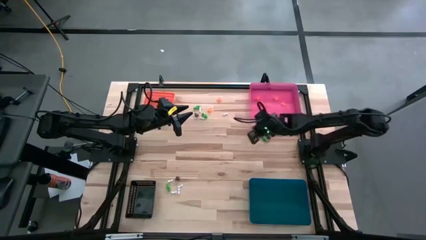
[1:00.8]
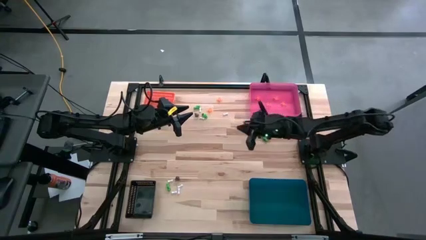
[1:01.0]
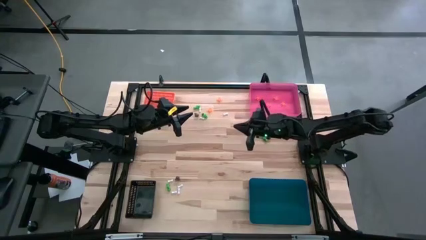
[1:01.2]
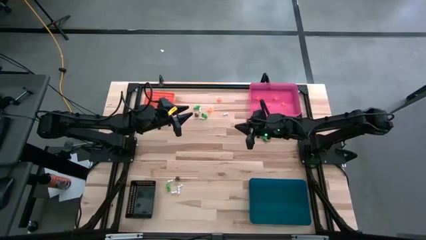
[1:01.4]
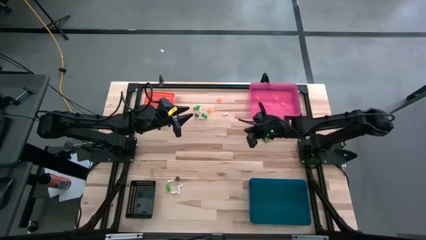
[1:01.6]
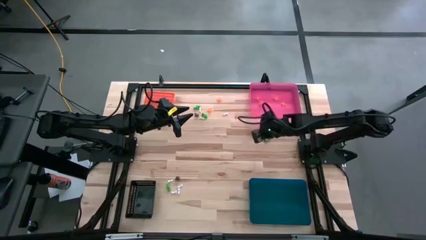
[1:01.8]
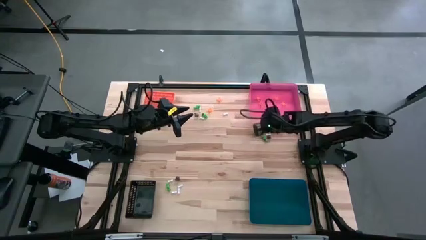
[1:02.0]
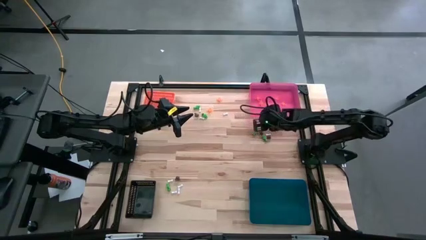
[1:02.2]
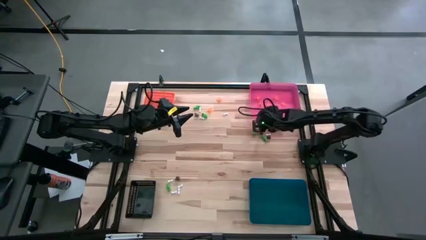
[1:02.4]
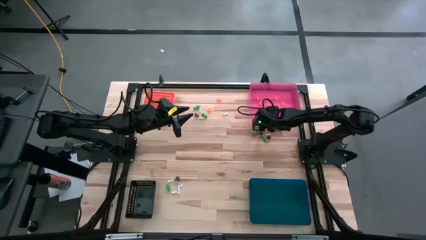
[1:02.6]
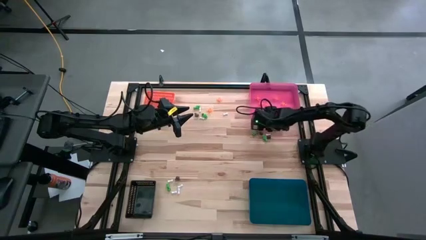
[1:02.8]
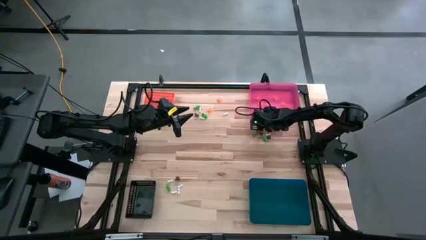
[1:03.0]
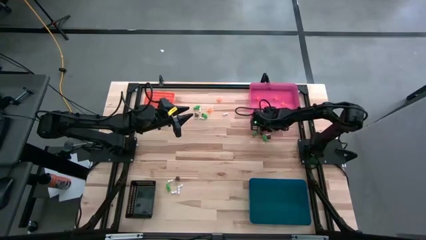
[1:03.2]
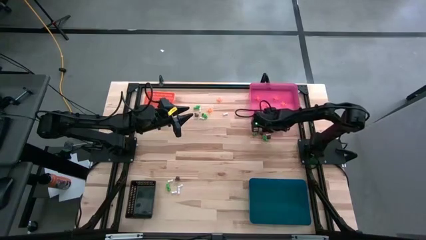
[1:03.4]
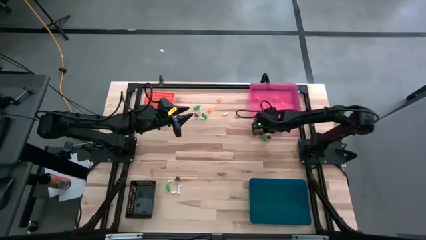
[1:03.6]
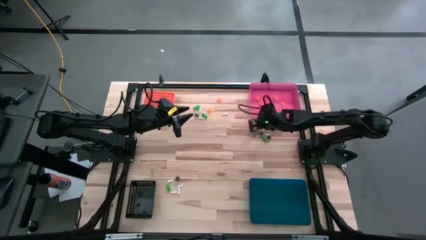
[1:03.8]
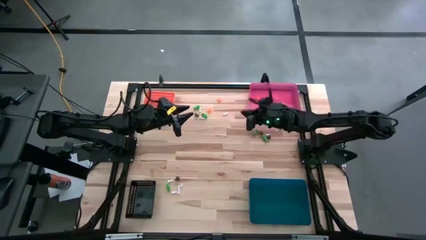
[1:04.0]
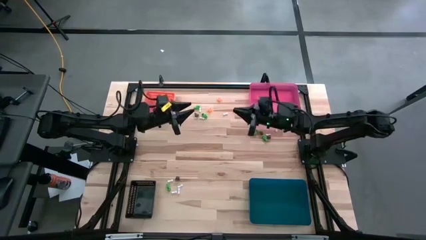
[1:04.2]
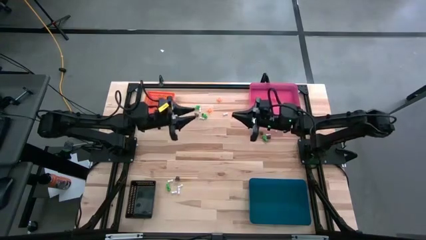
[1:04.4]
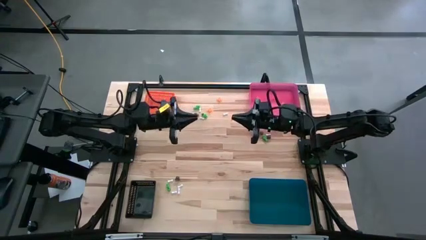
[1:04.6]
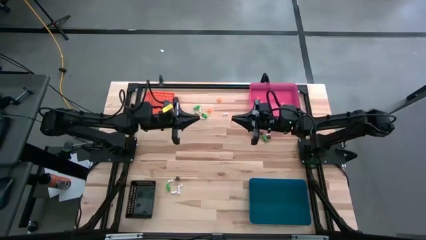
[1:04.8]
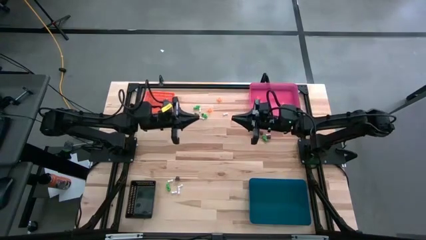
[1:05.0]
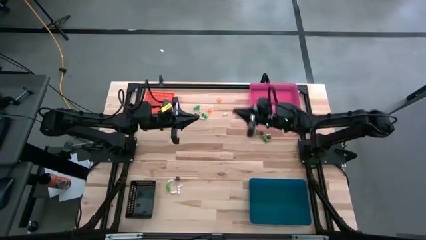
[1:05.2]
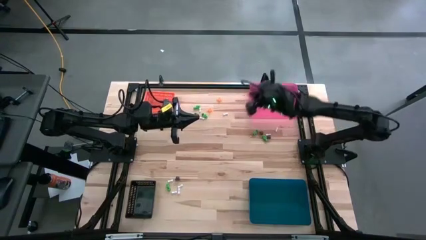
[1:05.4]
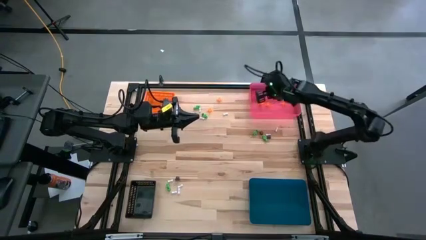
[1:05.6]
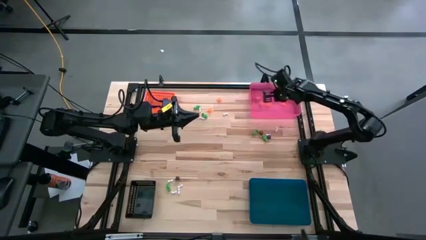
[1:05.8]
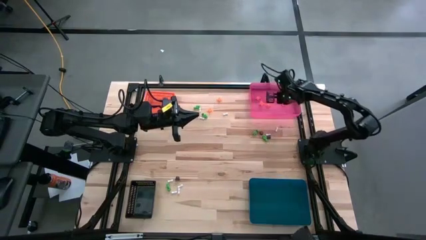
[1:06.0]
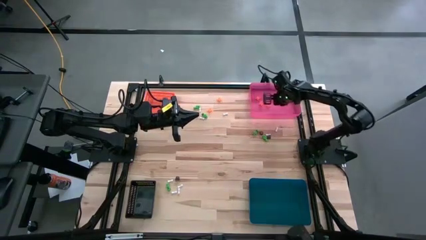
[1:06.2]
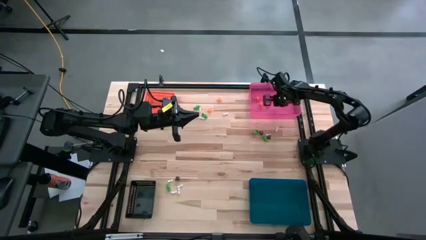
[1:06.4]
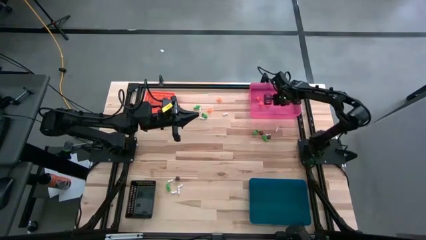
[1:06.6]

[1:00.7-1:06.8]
Task: Sort Halloween decoration
Put the bottom right orange spider toy into the pink bin

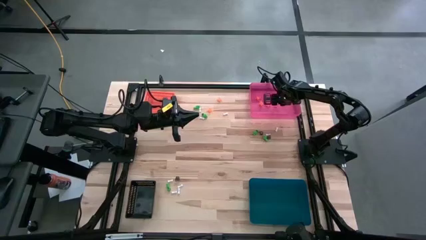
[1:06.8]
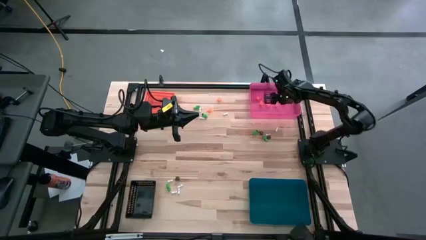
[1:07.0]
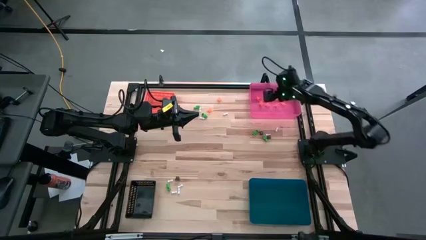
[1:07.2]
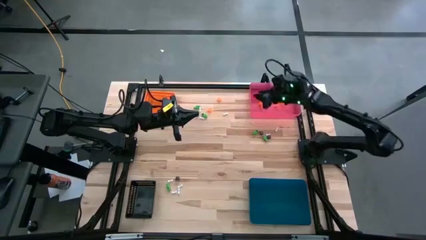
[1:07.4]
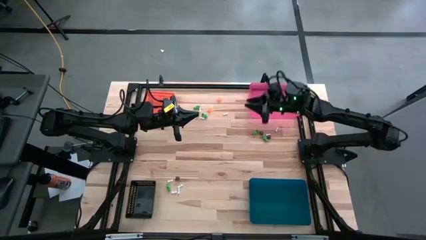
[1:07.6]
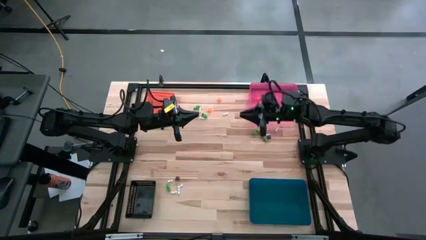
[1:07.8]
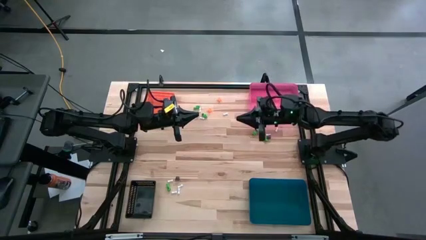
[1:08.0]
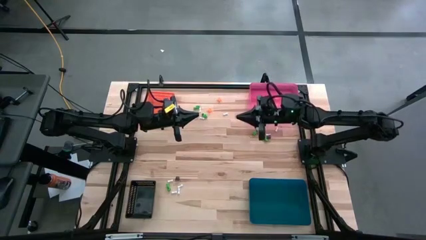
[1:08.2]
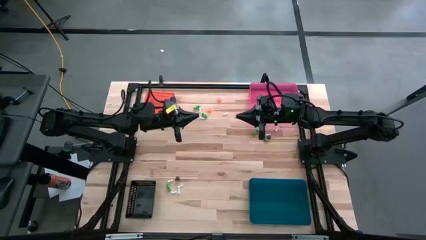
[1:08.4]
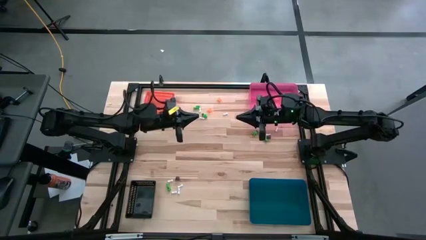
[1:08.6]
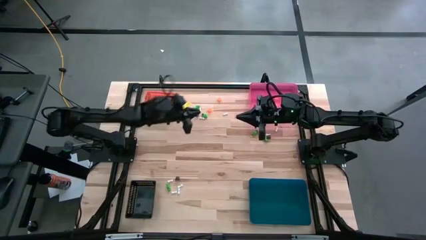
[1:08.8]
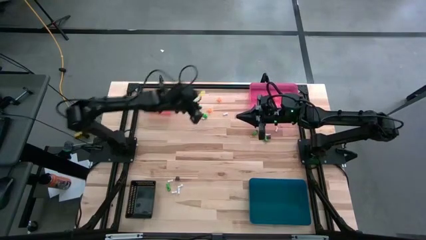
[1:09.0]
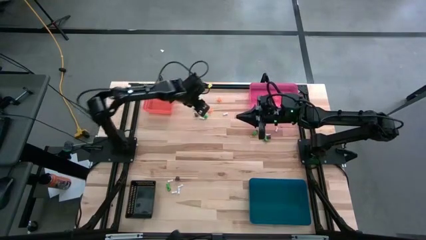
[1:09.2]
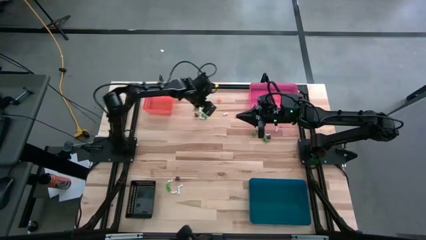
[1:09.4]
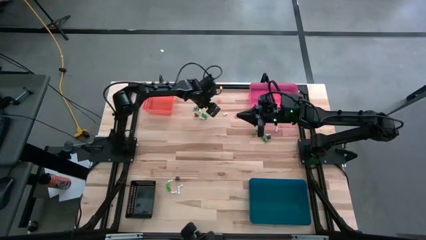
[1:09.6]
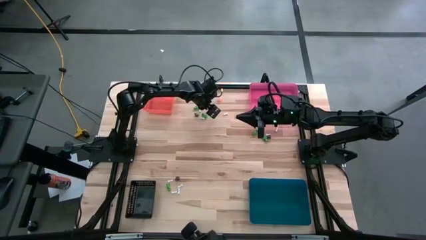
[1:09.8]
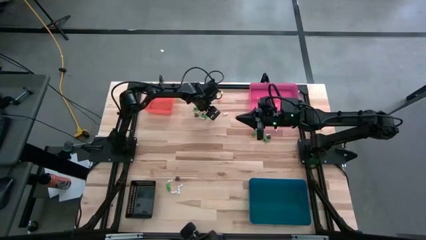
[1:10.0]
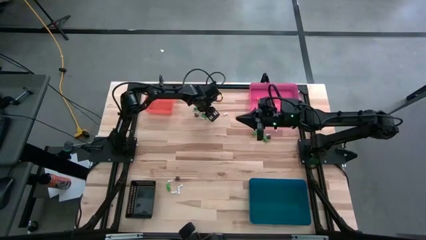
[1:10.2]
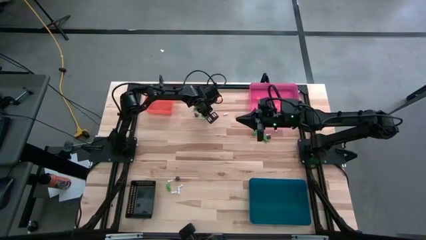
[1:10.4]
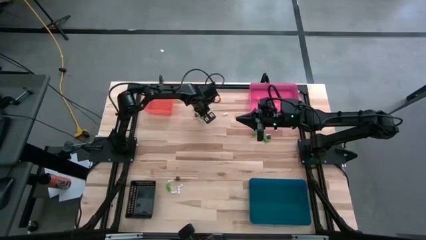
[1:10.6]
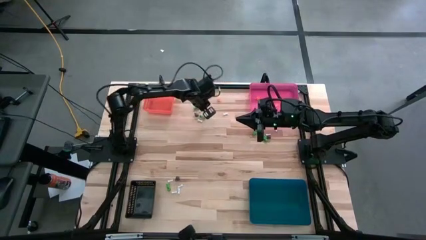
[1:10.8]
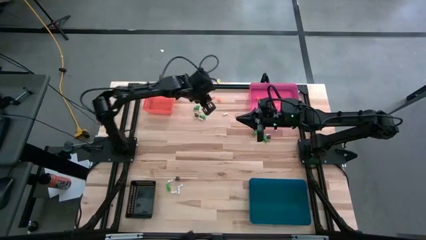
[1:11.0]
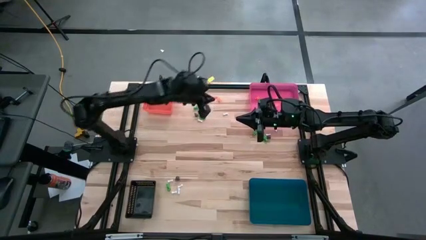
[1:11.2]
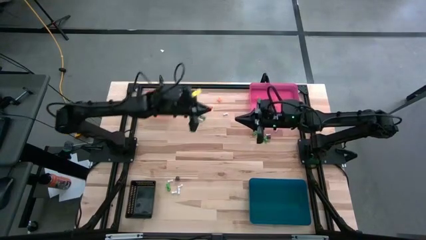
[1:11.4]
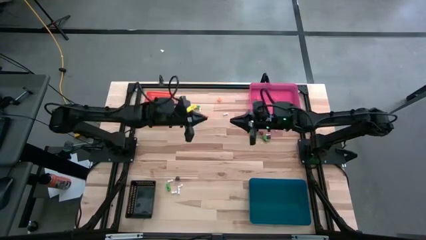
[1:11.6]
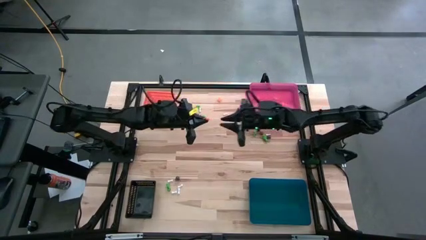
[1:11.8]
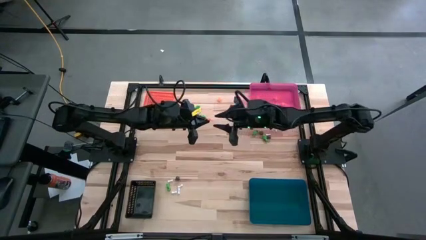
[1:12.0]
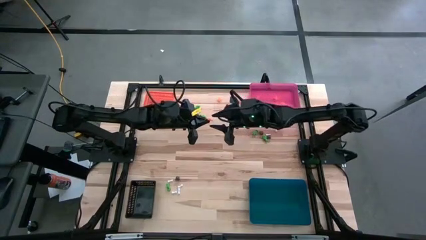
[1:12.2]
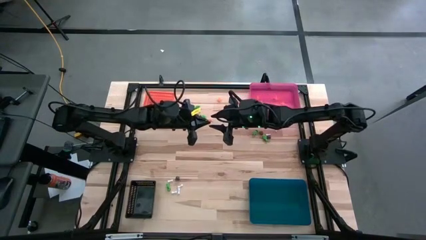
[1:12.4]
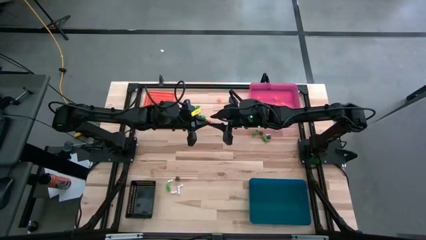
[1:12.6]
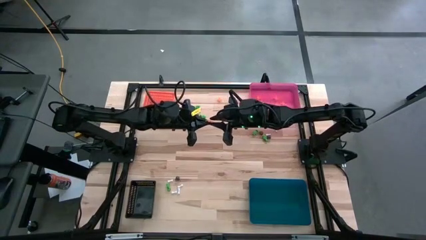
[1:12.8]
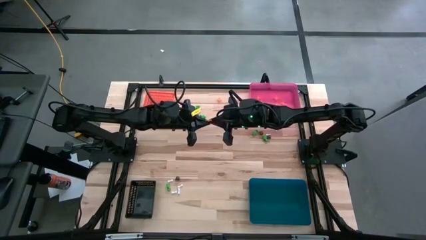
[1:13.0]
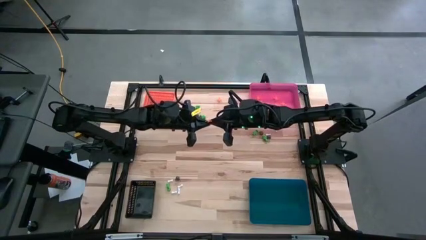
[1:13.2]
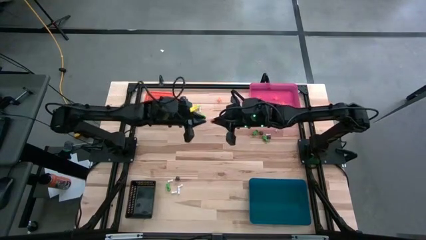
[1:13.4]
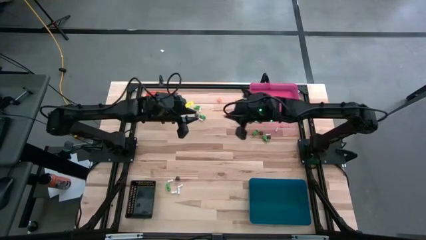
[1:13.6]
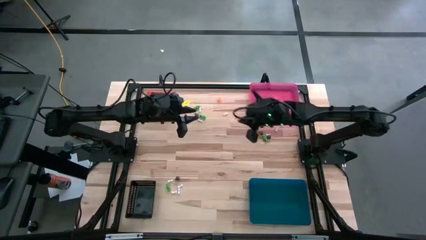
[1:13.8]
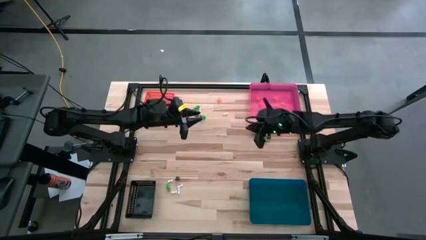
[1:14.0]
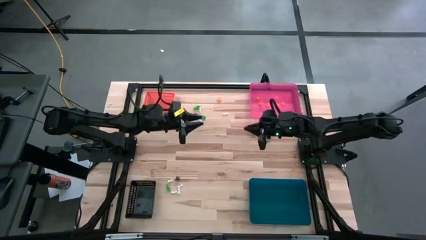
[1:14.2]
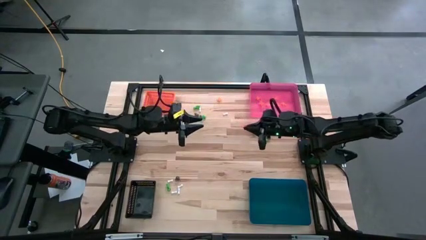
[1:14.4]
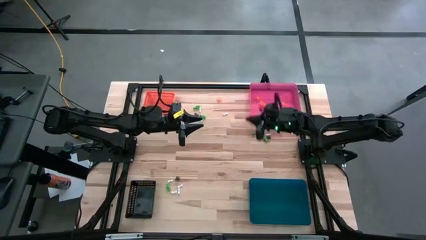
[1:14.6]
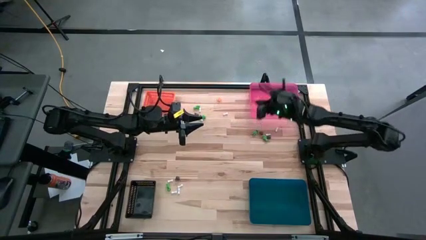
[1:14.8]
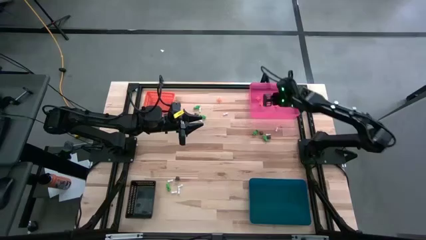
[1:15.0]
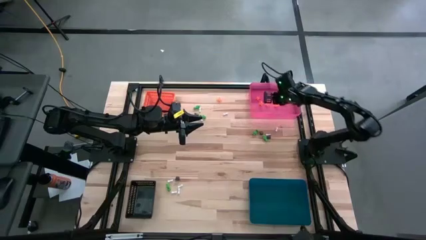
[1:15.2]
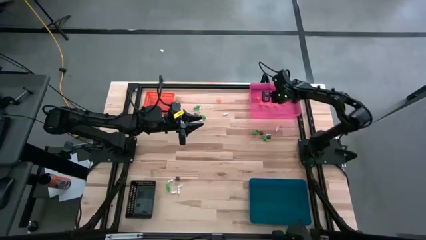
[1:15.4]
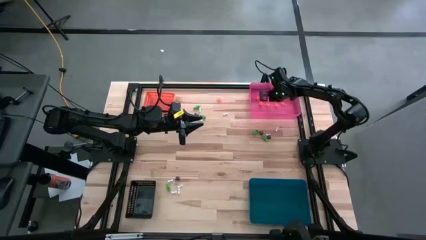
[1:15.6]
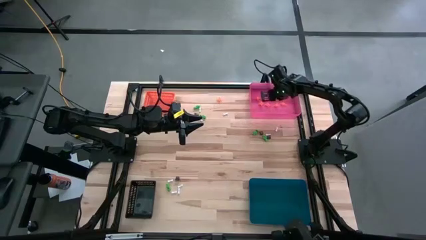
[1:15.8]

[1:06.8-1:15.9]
Put the bottom orange spider toy into the pink bin

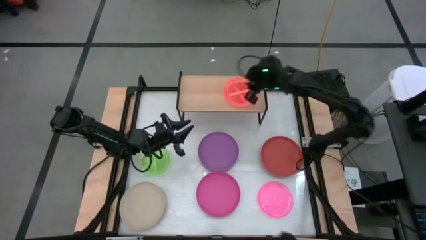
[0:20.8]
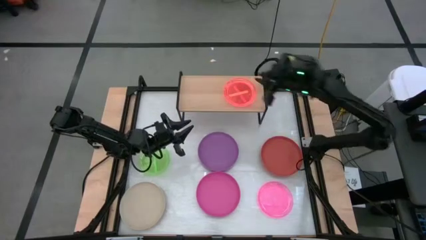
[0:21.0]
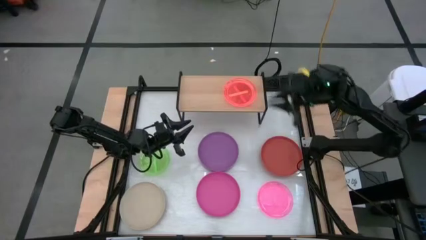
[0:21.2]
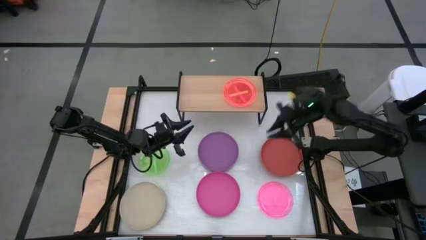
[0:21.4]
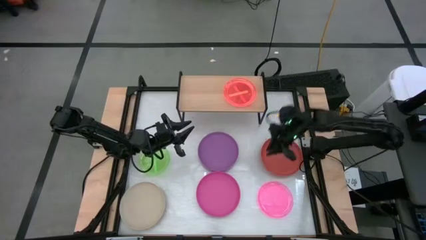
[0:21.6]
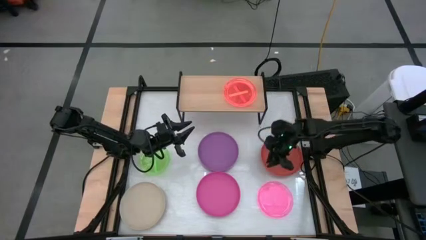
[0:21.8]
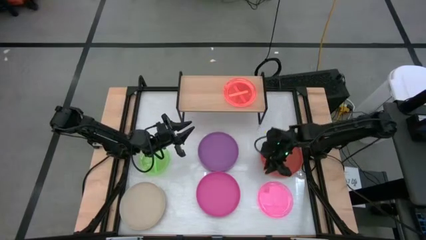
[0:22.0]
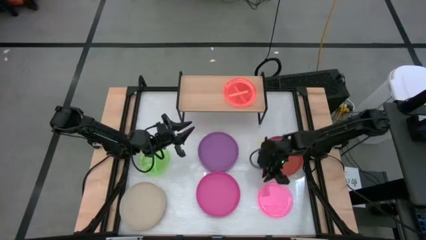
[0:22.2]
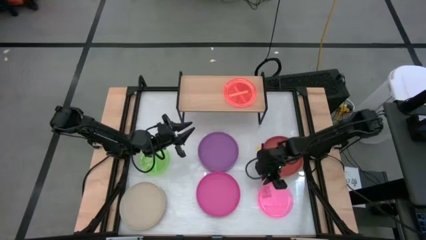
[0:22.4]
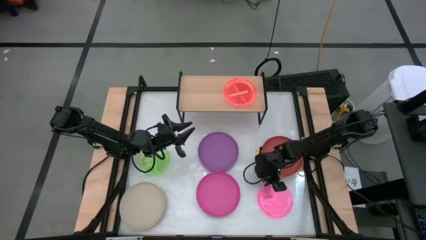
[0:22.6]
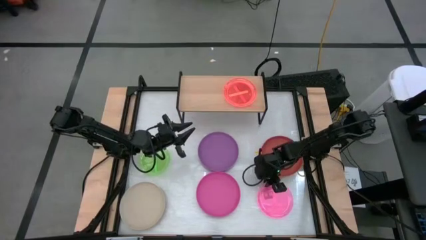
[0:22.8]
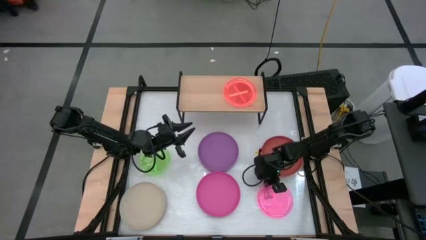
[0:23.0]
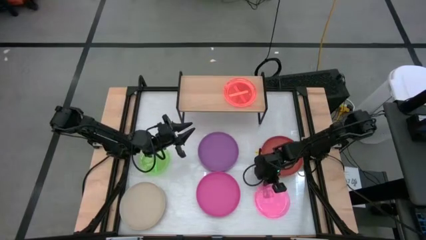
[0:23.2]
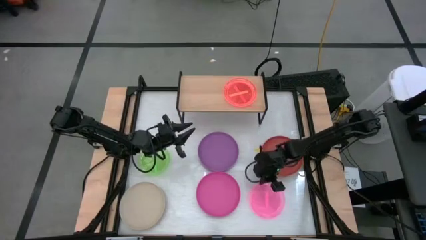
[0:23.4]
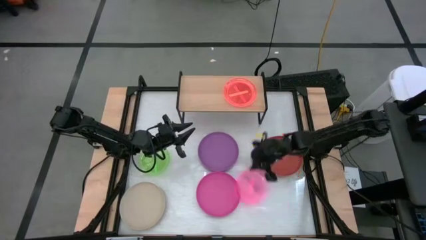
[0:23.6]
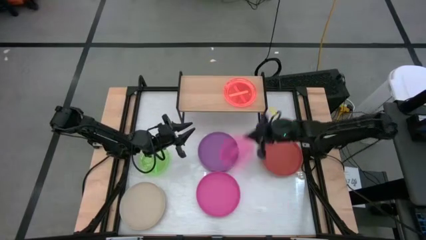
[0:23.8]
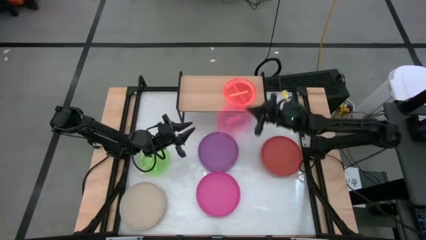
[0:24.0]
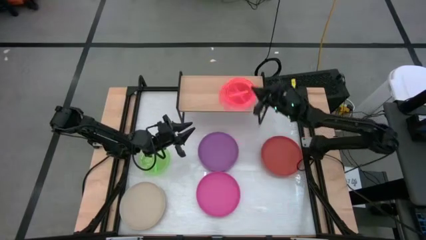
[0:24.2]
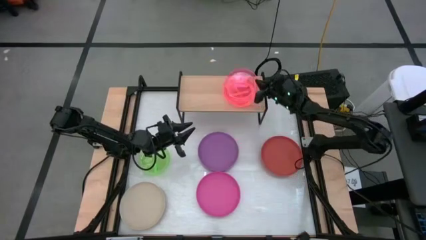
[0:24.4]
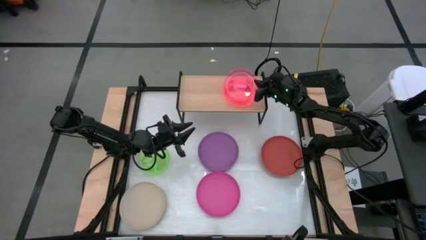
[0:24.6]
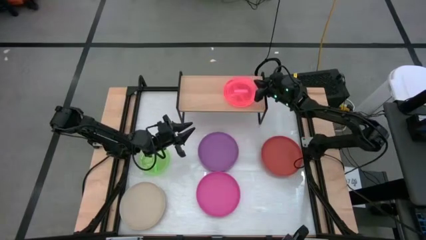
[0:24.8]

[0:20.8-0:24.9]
Task: Place and stack plates onto a shelf
Stack the light pink plate on top of the light orange plate on the shelf
